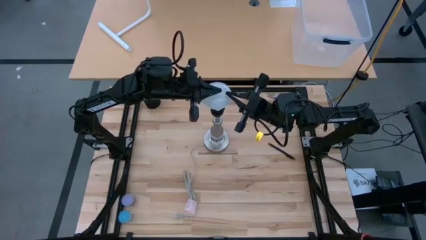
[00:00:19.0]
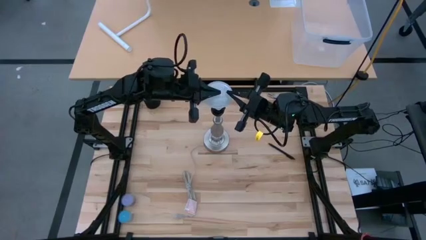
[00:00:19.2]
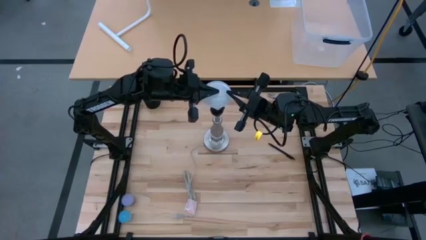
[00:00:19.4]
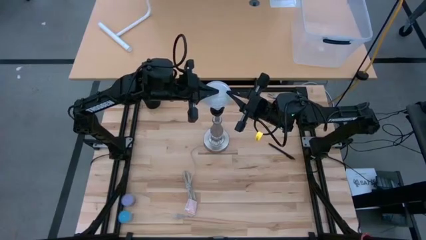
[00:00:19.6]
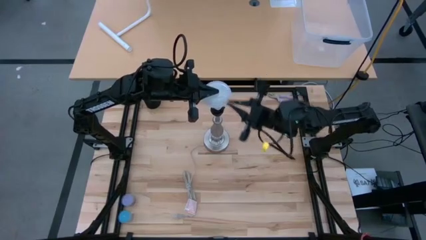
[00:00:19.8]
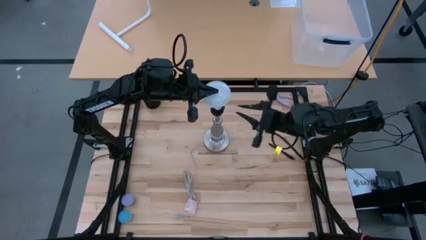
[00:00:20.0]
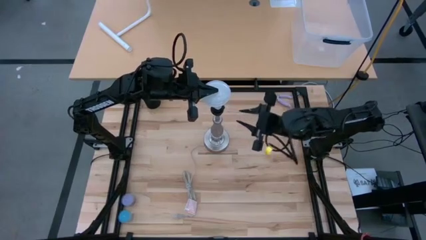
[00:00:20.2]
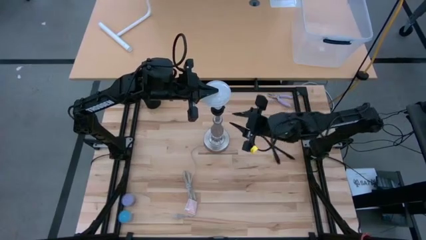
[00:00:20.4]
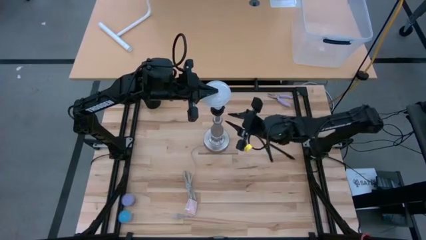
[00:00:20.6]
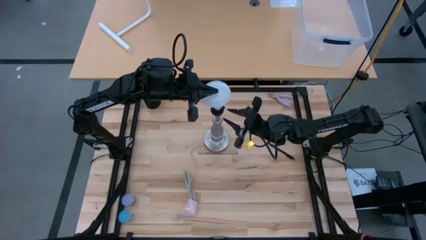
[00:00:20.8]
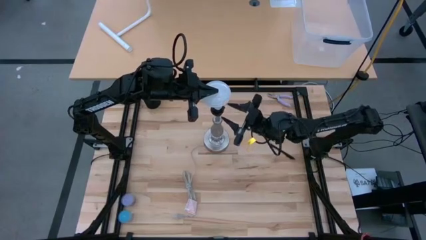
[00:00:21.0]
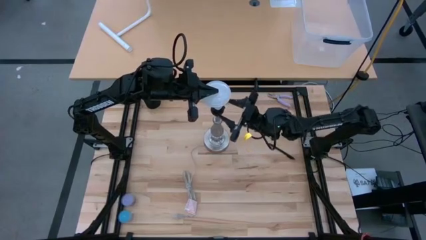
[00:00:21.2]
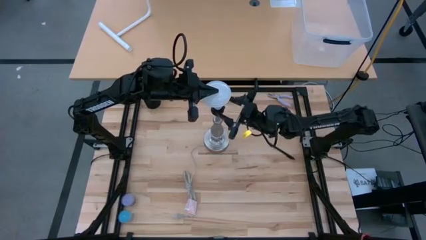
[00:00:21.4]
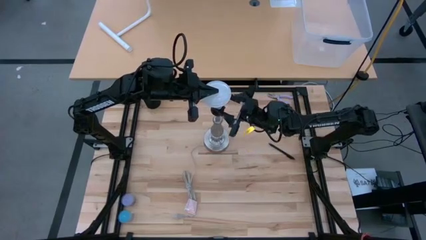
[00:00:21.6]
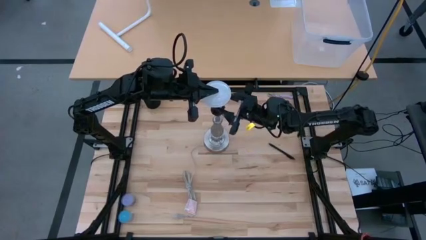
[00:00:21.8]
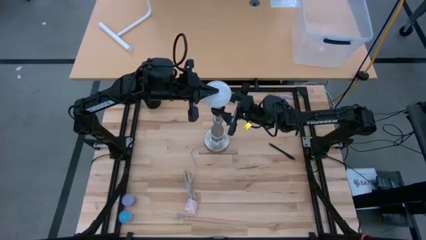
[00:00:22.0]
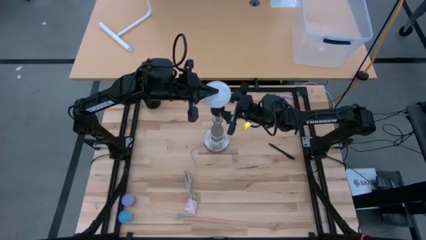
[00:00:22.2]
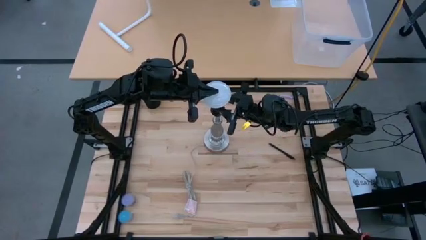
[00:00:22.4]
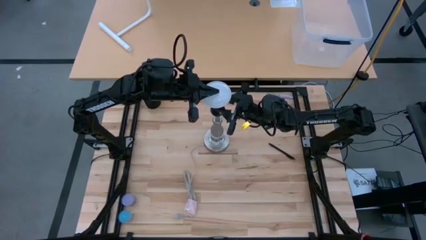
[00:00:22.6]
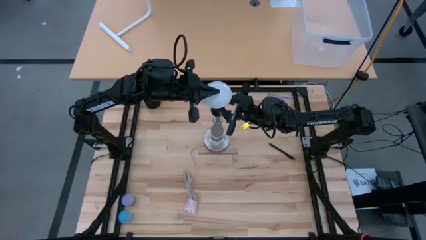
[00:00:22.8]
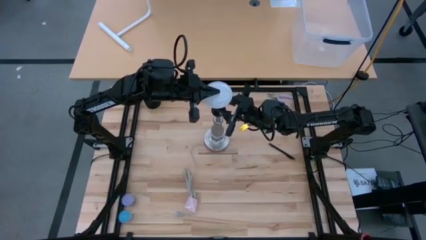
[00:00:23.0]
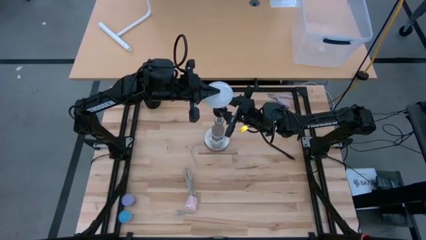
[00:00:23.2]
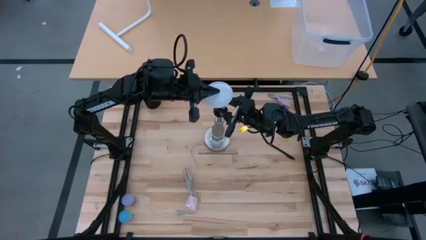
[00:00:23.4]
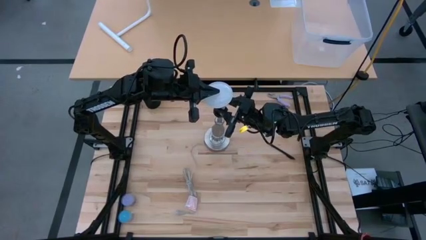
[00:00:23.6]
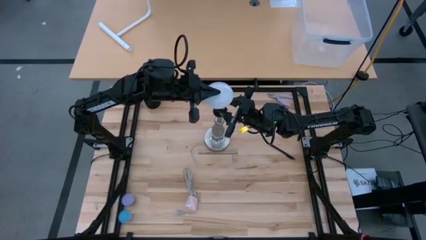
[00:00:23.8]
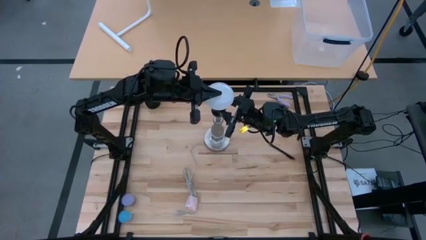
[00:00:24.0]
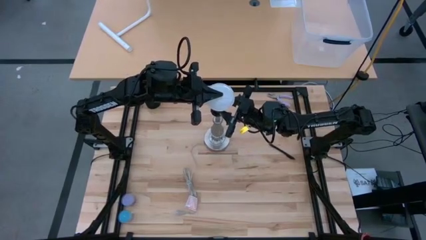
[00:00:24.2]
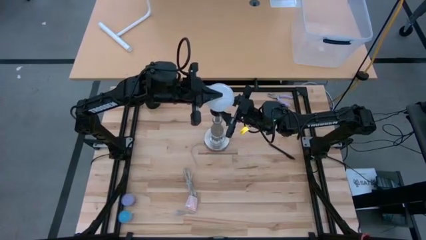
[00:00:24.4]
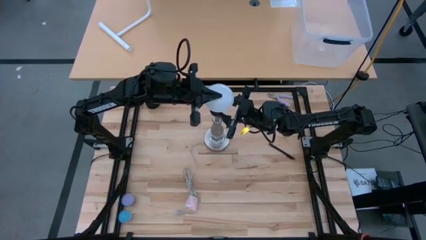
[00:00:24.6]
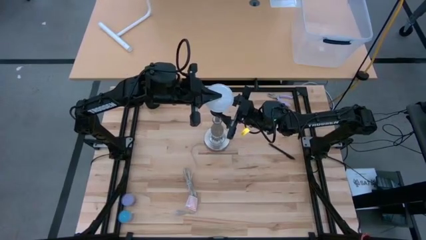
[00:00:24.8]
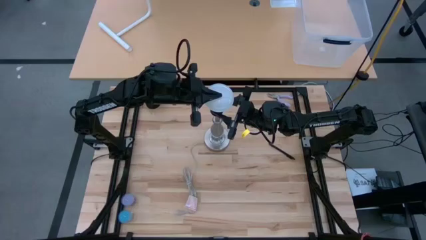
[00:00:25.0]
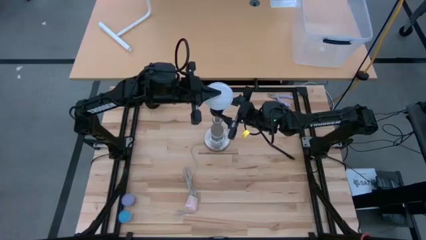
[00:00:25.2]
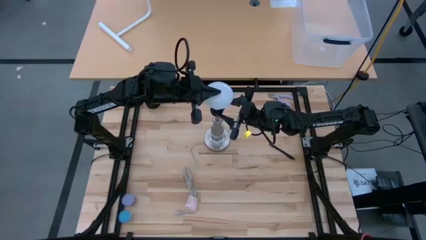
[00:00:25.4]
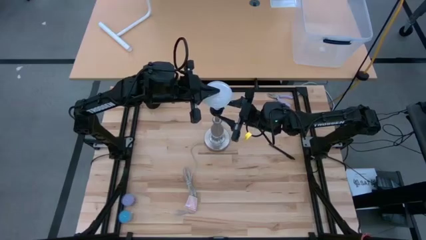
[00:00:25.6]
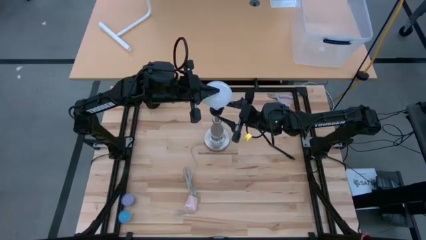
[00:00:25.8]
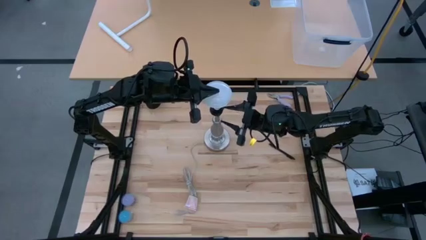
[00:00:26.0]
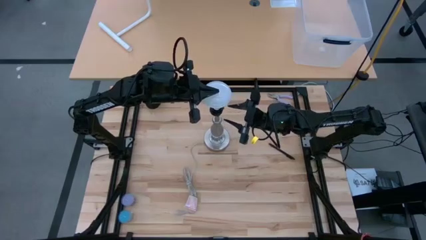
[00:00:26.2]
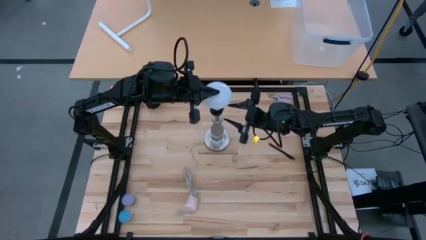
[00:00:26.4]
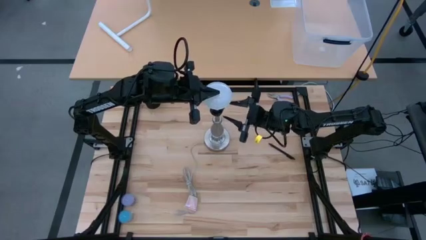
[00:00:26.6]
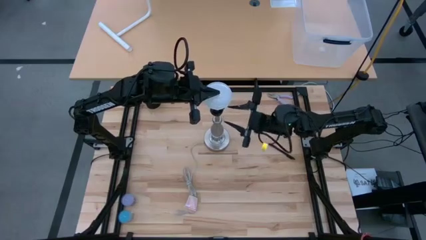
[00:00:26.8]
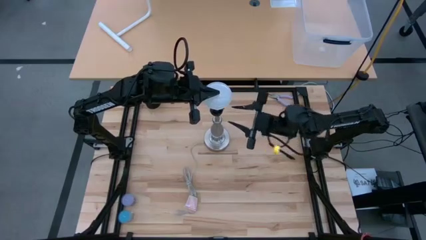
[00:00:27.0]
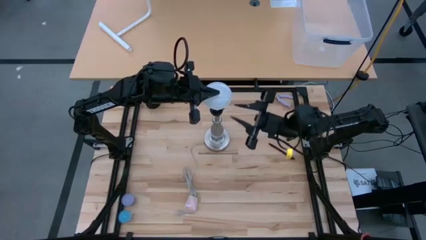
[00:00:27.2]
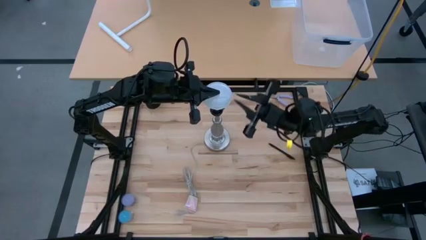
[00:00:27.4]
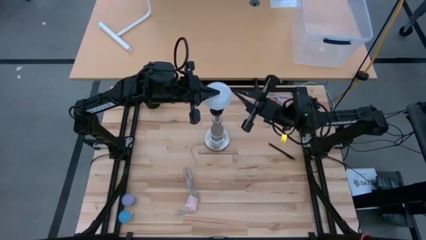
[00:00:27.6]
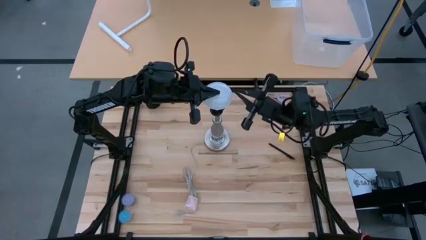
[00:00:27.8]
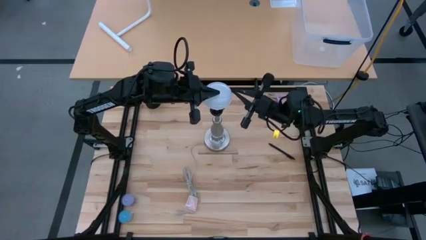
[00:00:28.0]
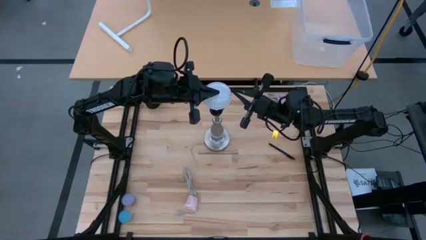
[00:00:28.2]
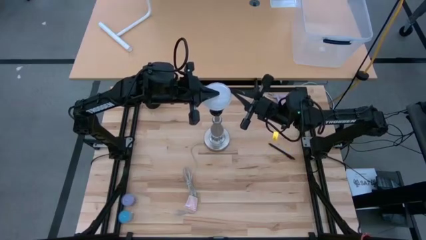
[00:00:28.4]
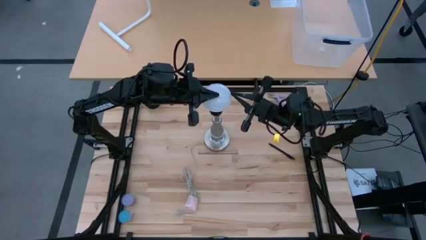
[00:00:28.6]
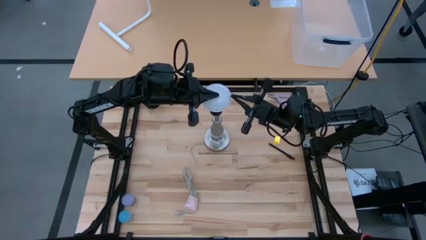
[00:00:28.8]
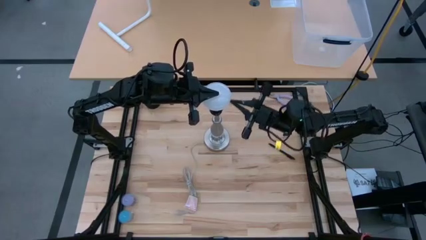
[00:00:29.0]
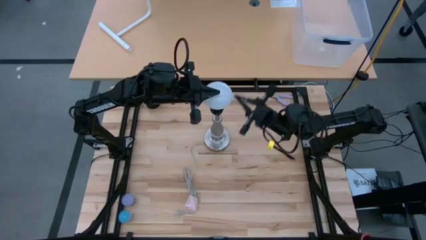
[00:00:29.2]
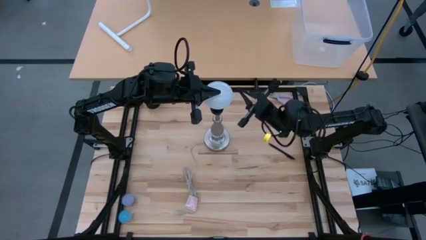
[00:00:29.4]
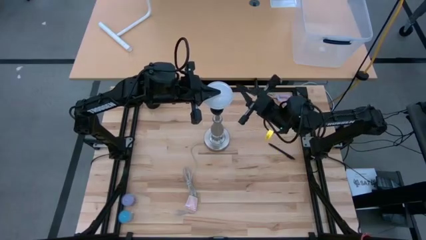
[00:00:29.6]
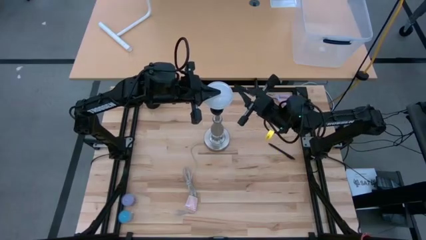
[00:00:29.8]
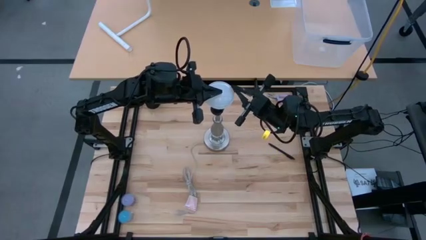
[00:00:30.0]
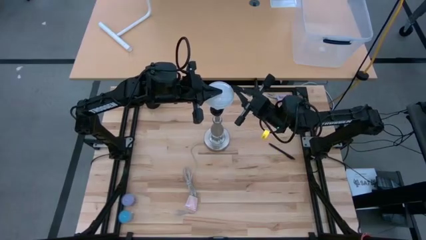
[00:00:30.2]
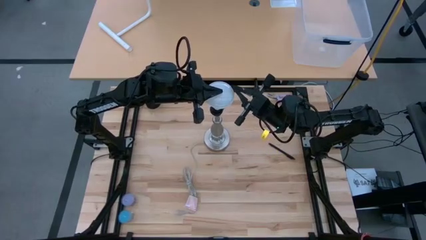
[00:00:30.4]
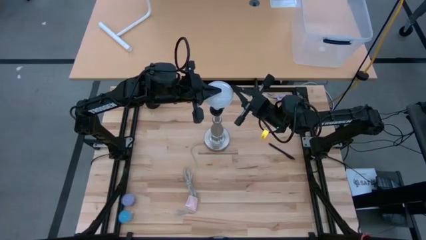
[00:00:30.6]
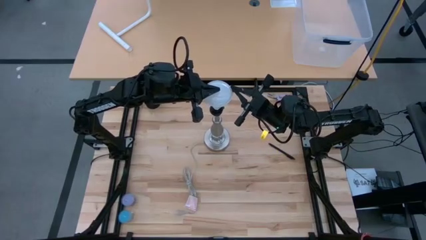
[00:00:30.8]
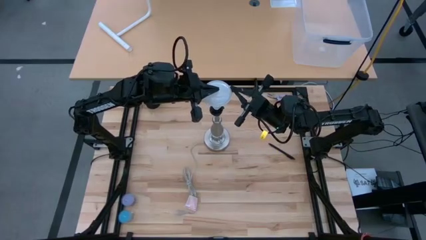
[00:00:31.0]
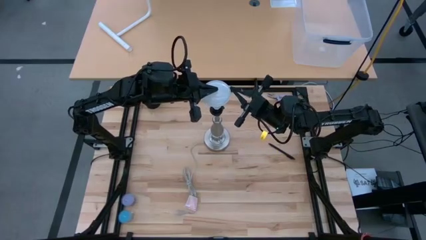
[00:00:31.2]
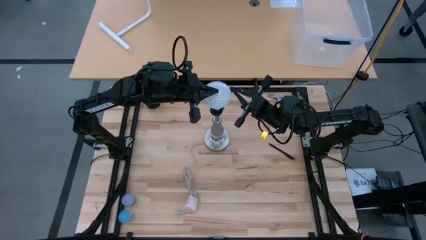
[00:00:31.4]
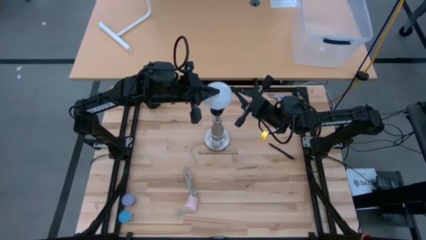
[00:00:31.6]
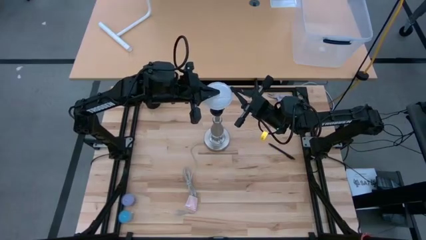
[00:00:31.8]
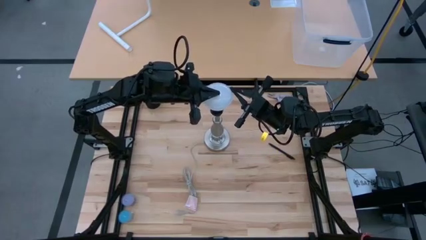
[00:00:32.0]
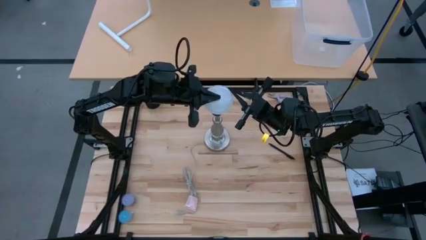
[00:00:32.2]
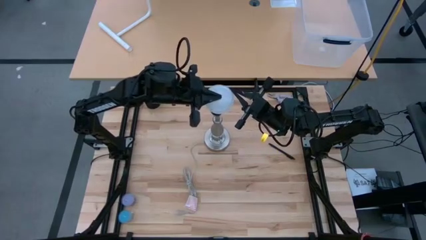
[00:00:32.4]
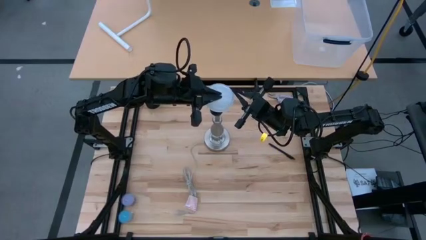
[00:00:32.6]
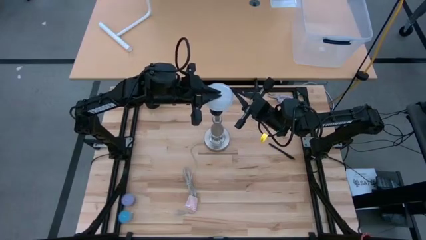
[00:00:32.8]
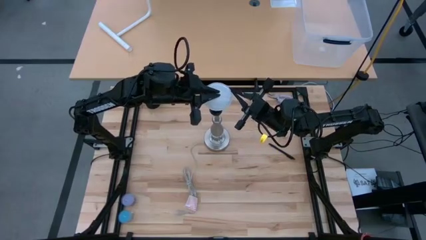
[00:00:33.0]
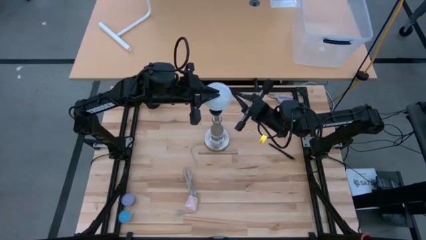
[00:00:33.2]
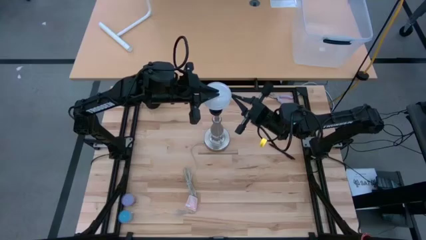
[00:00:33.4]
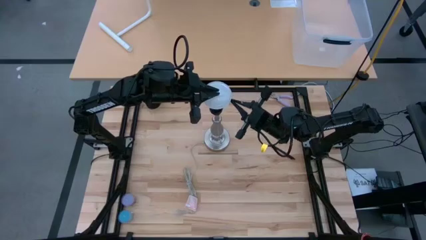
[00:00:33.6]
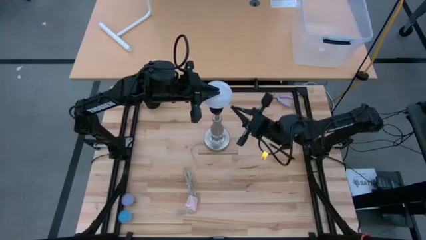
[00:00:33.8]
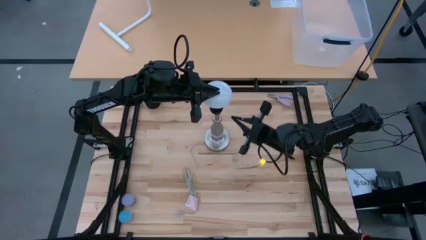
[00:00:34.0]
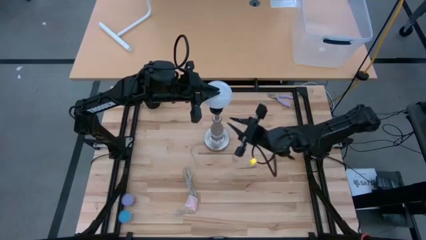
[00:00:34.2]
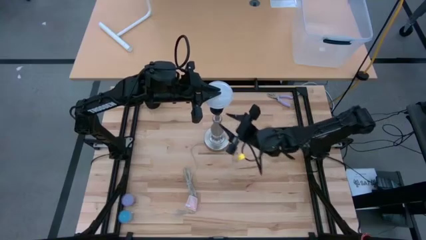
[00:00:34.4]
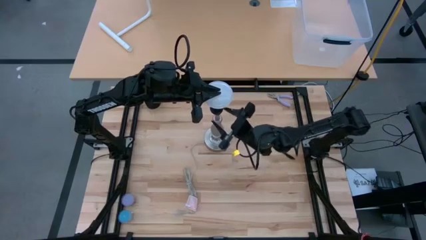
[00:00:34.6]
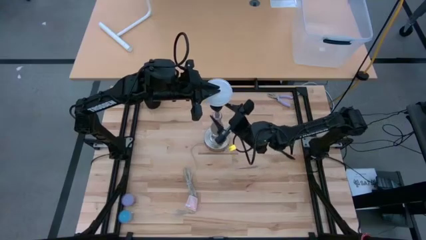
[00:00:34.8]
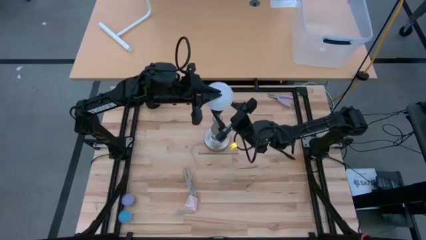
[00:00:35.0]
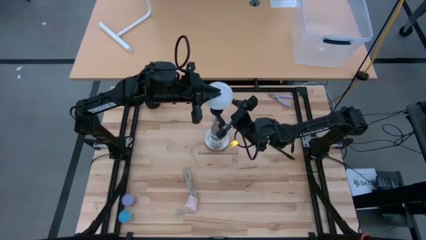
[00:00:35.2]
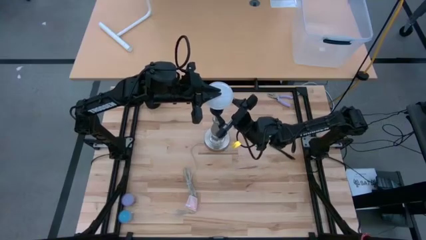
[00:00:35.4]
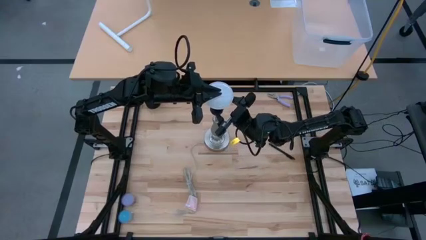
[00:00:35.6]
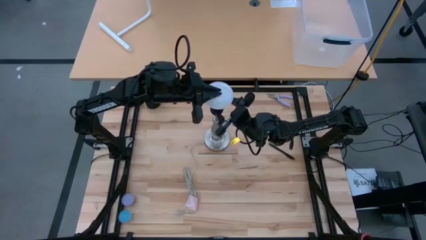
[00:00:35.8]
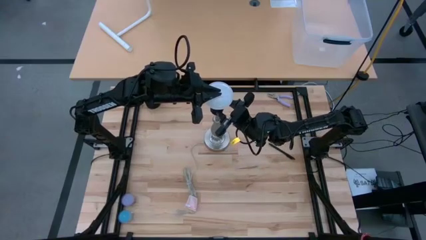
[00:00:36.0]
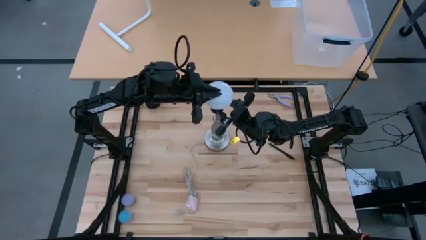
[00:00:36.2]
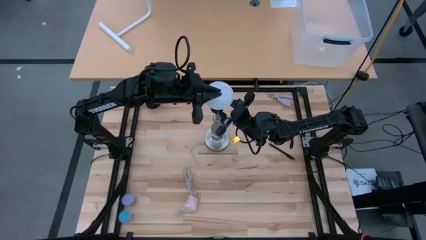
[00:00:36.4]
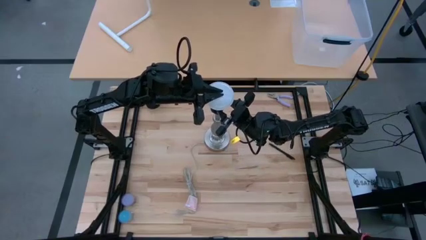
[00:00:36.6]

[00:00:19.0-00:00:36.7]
Task: Screw lightbulb
Insert the lightbulb into the lamp
